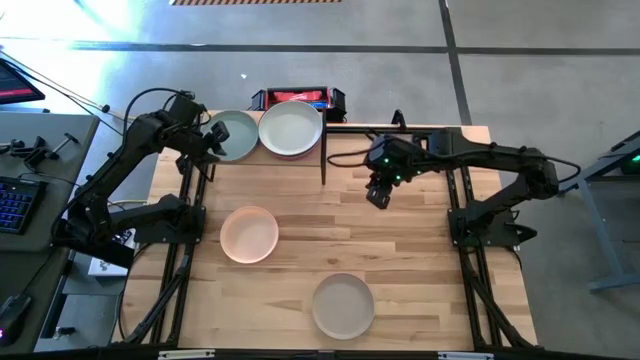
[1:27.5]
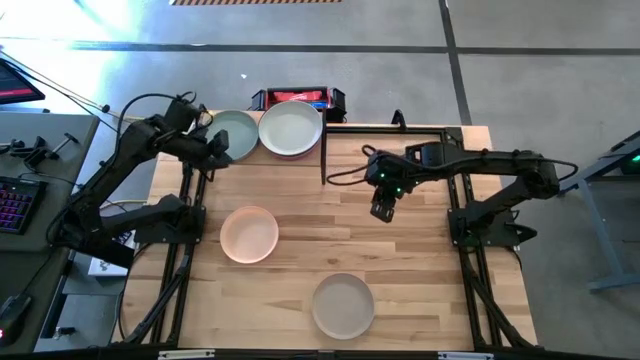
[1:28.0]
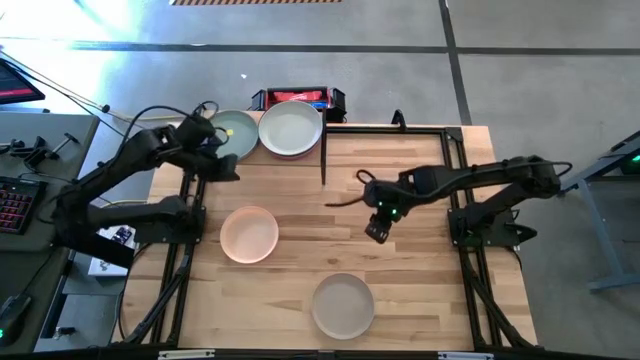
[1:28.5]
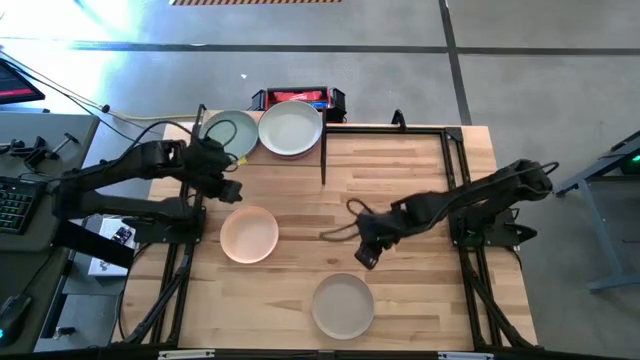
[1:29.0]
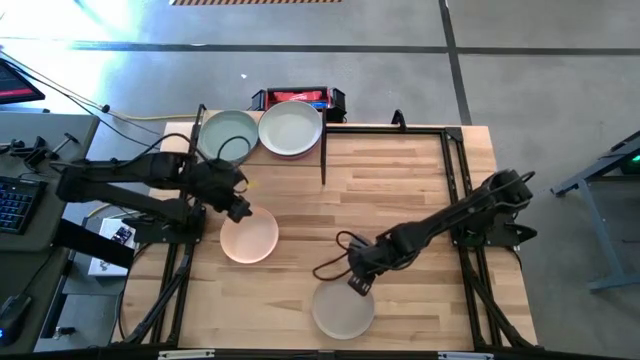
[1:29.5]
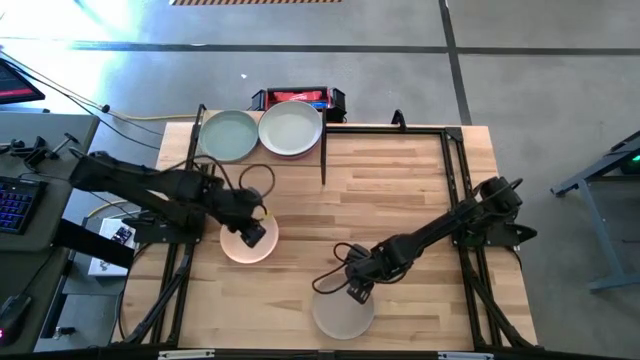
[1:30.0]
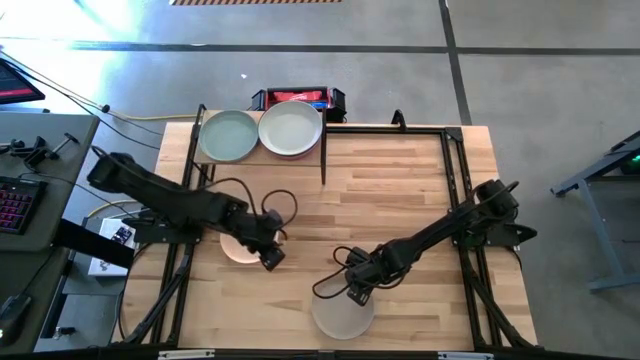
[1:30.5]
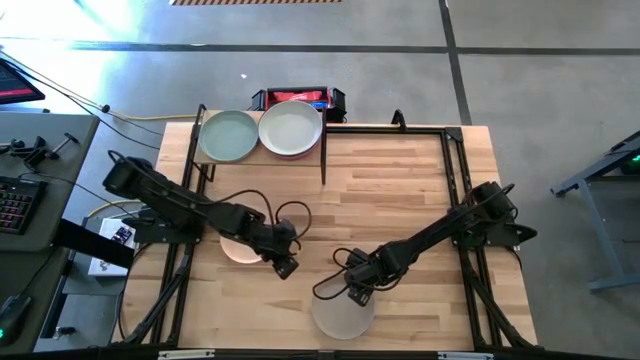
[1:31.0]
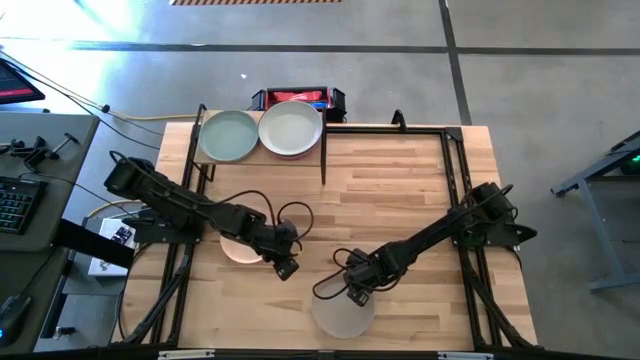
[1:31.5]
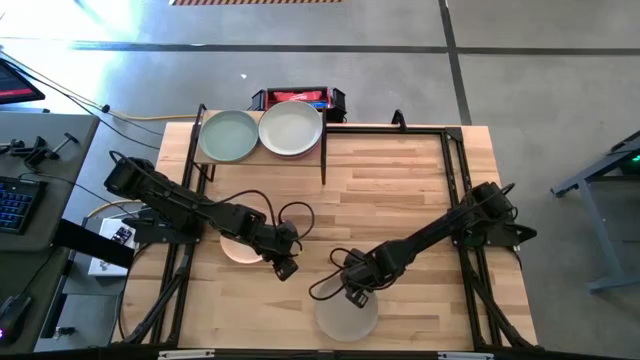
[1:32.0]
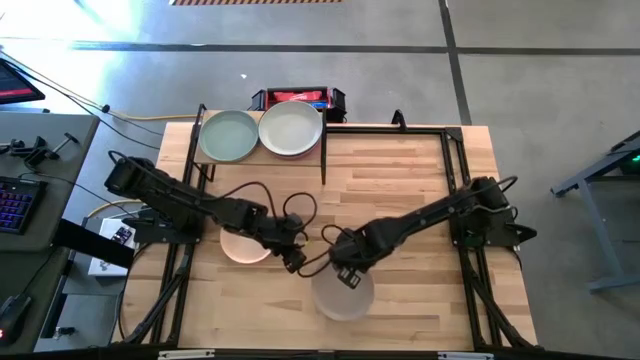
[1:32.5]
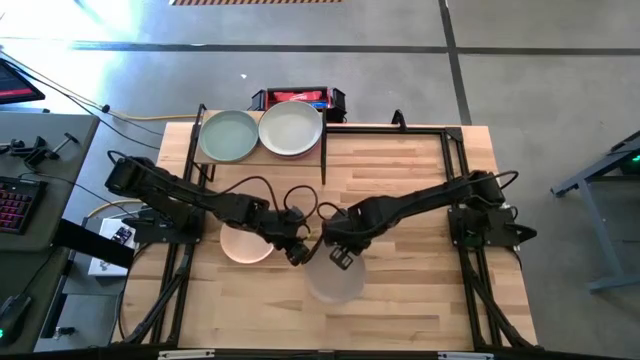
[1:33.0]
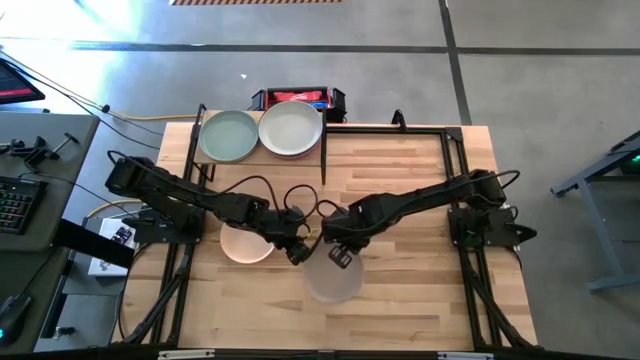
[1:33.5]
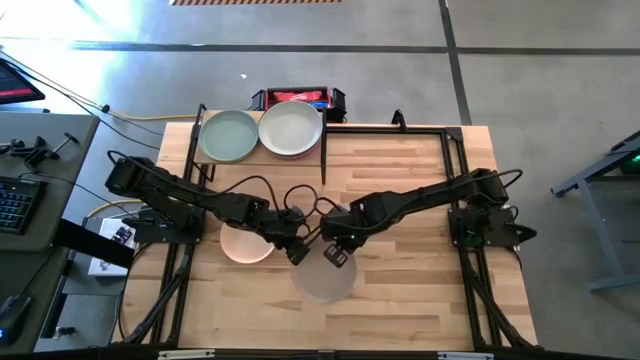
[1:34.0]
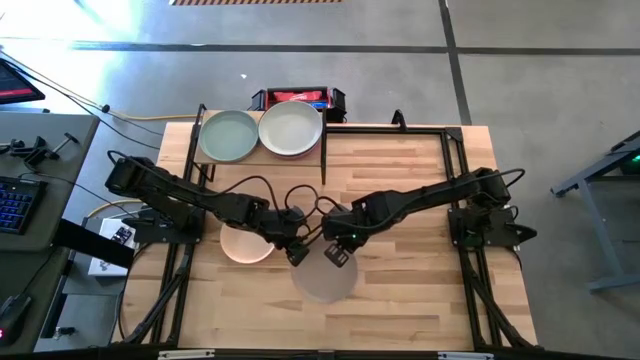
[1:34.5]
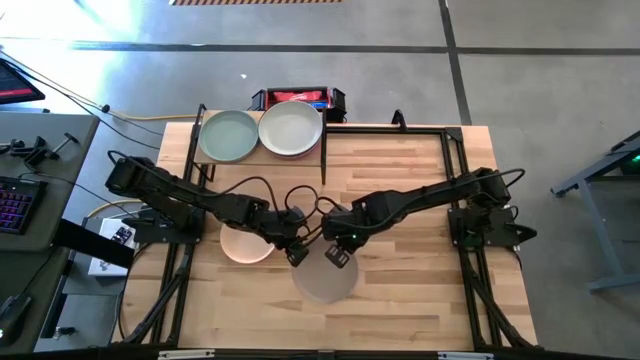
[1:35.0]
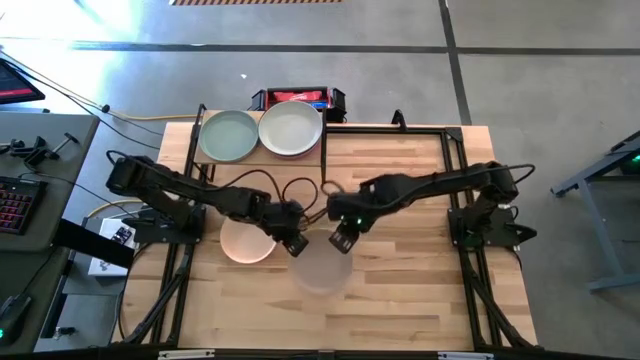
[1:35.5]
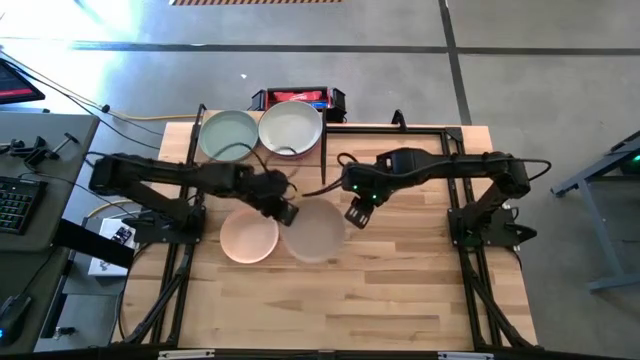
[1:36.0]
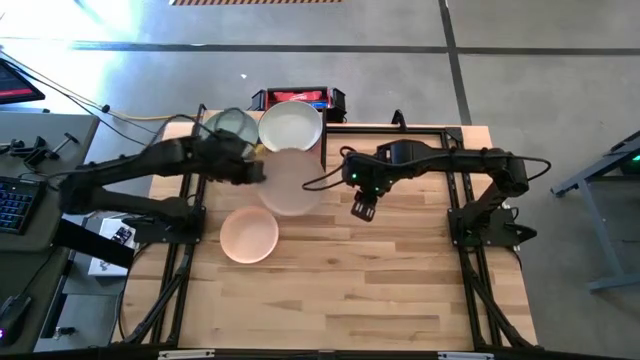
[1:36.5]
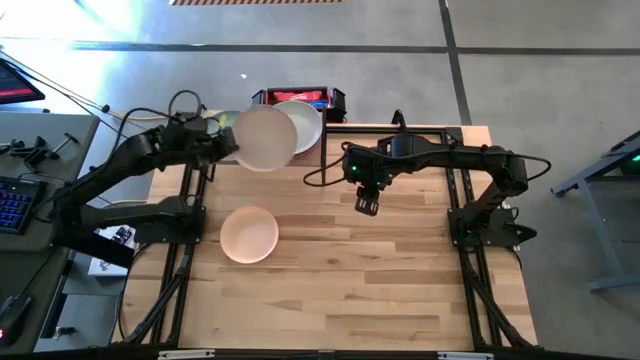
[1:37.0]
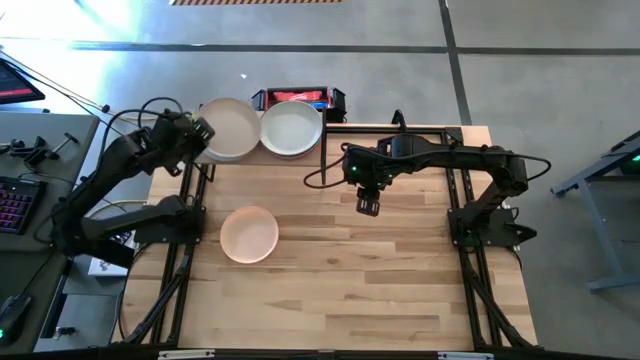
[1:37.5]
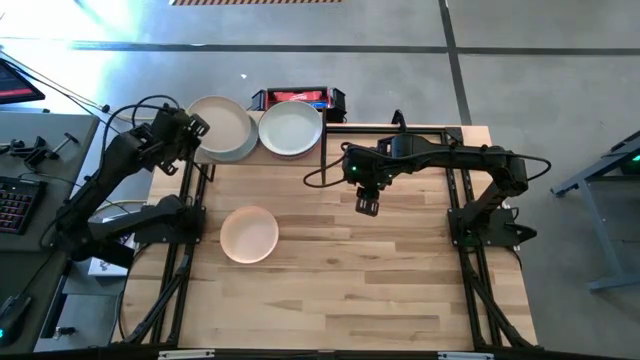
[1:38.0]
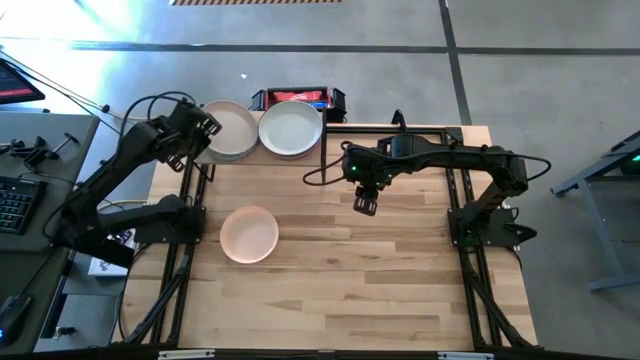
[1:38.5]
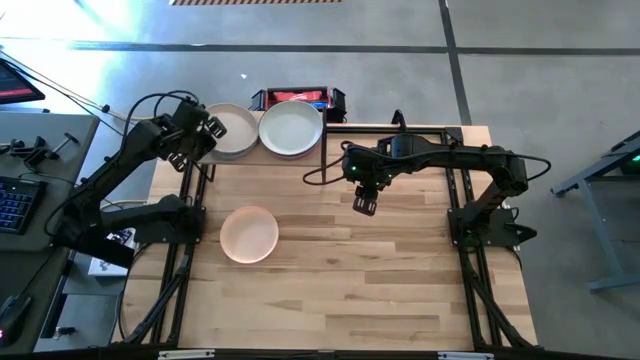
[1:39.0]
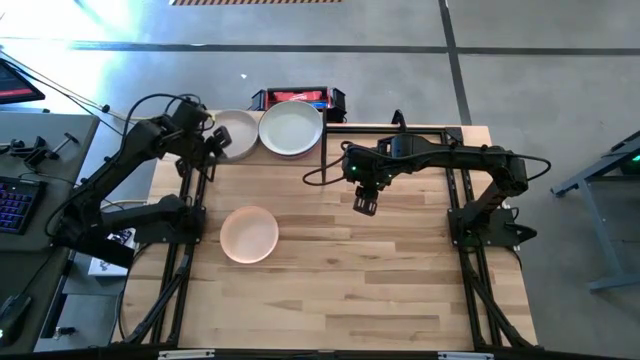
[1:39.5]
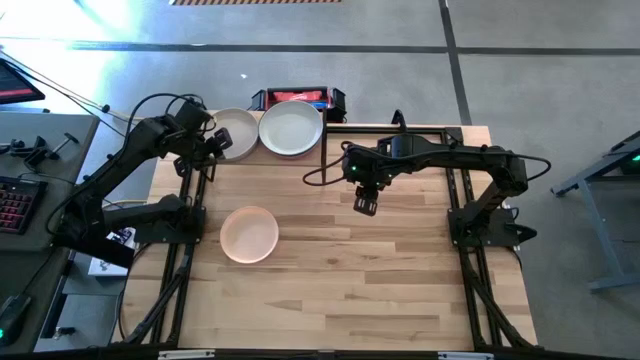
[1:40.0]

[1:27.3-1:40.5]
Task: Place and stack plates onto a shelf
Stack the light brown plate on top of the light blue plate on the shelf

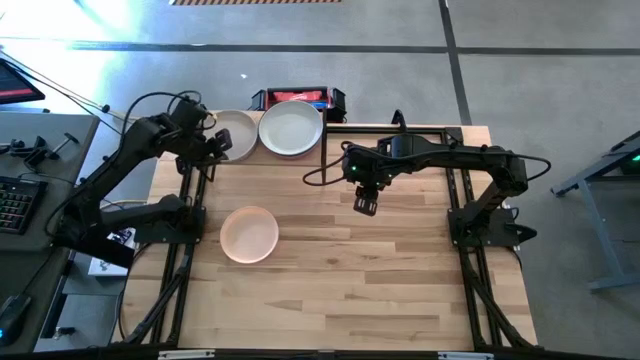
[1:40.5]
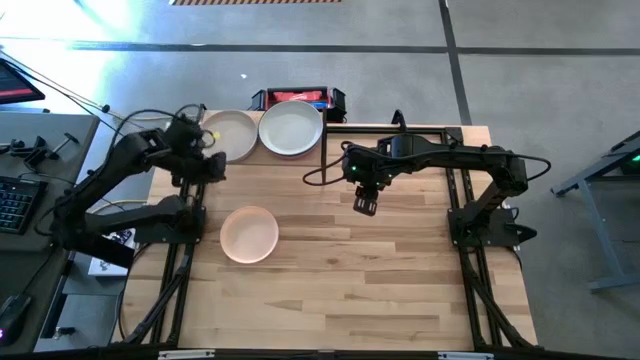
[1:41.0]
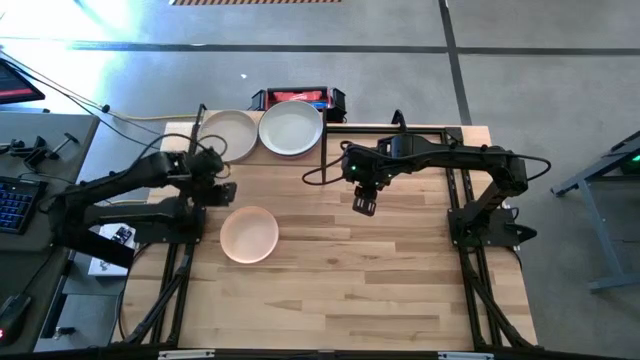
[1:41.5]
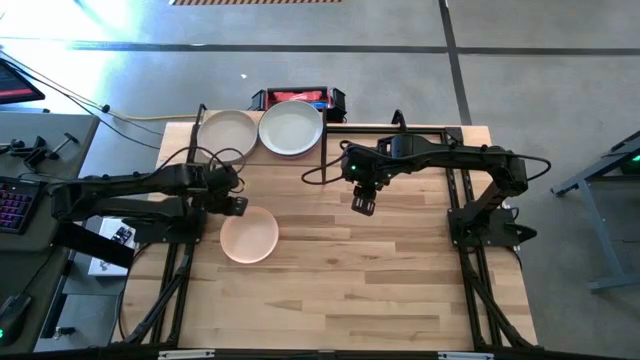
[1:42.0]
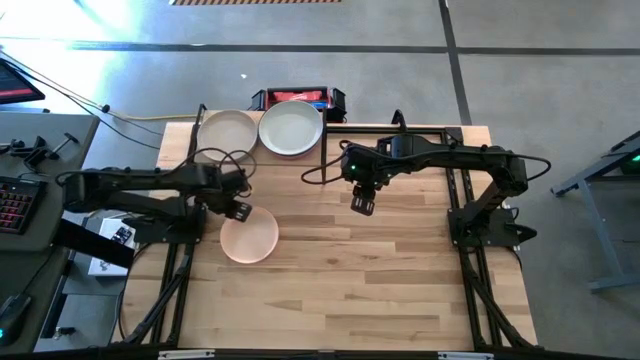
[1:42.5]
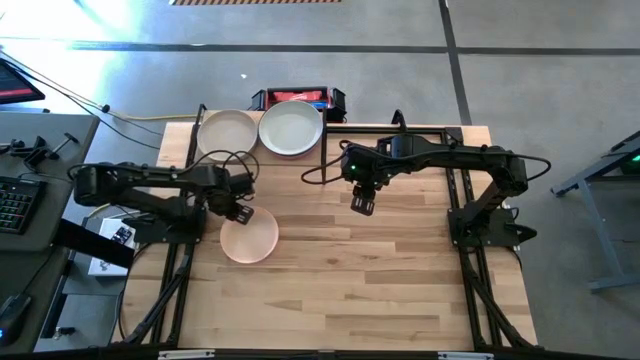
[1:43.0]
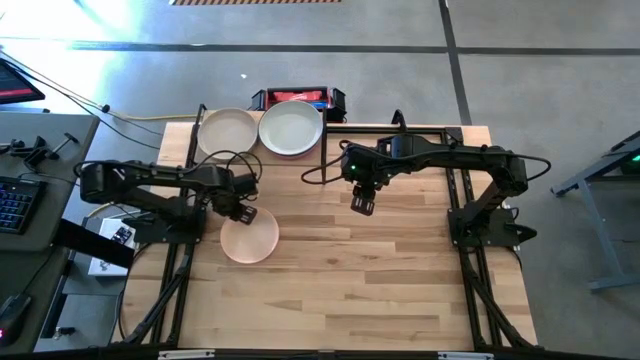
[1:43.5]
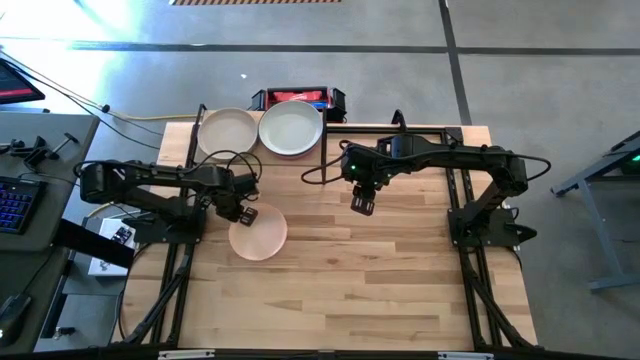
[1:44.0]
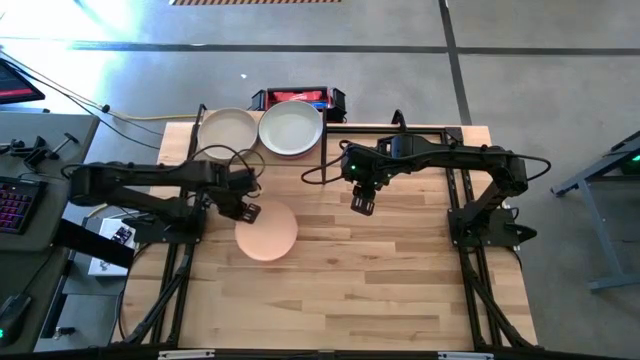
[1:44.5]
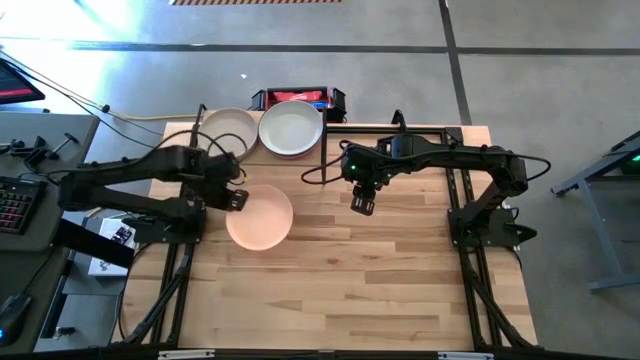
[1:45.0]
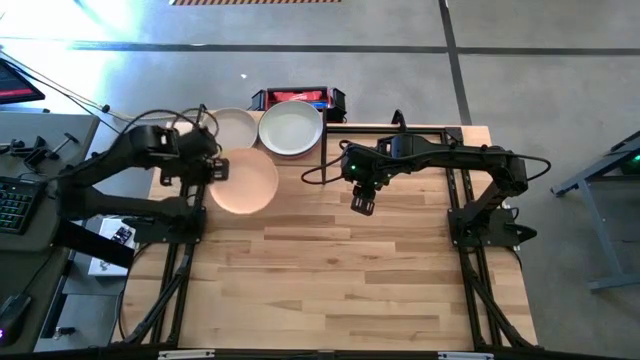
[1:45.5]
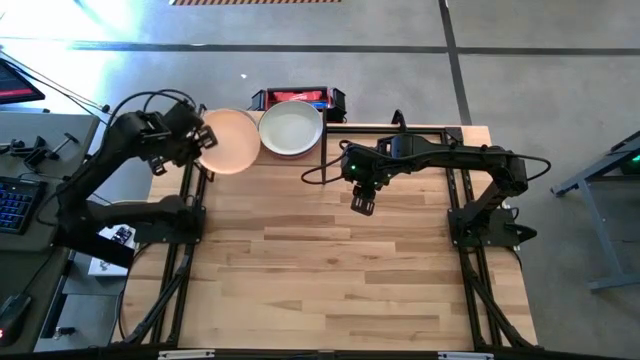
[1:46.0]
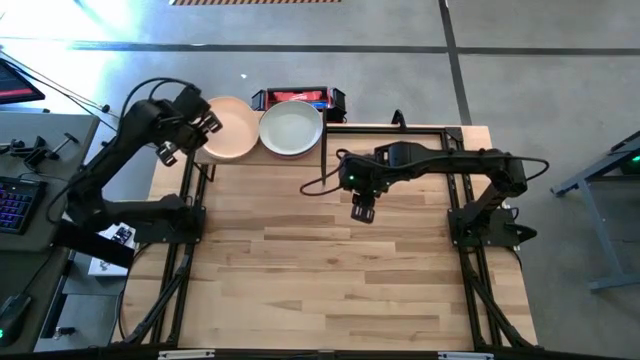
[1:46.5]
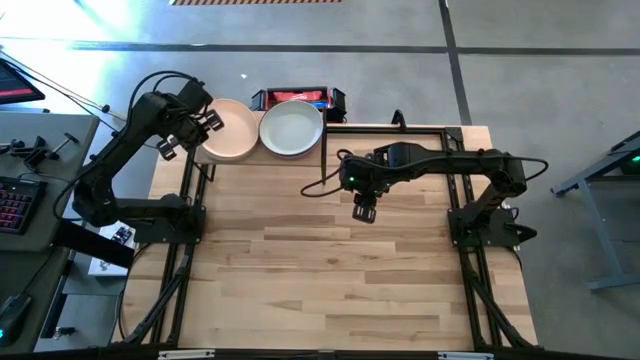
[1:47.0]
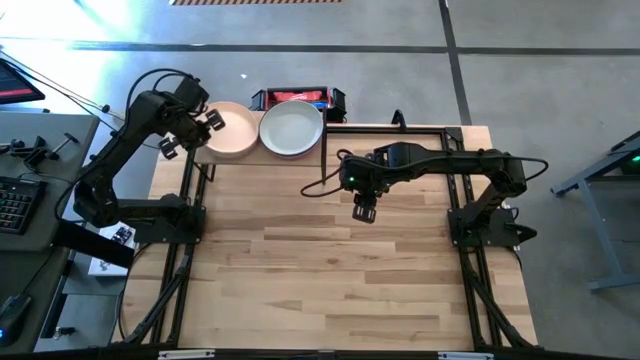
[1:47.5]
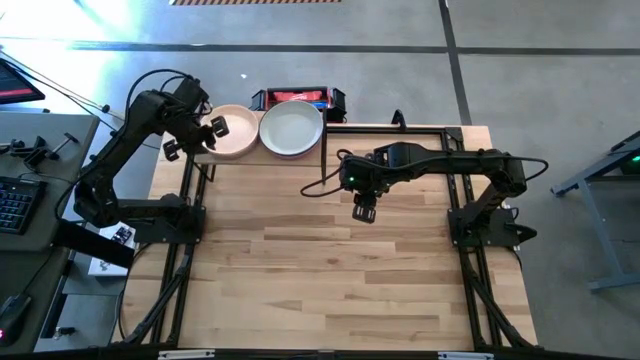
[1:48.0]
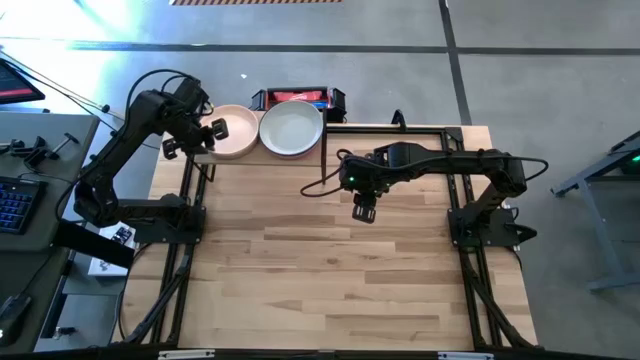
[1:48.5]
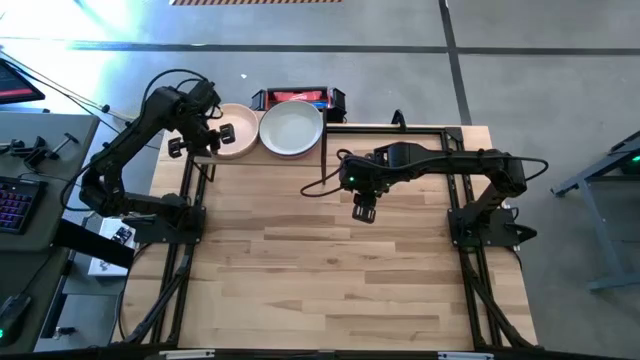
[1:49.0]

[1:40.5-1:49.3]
Stack the light orange plate on top of the light brown plate on the shelf

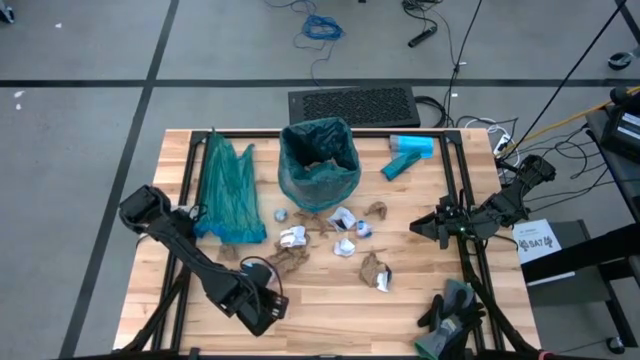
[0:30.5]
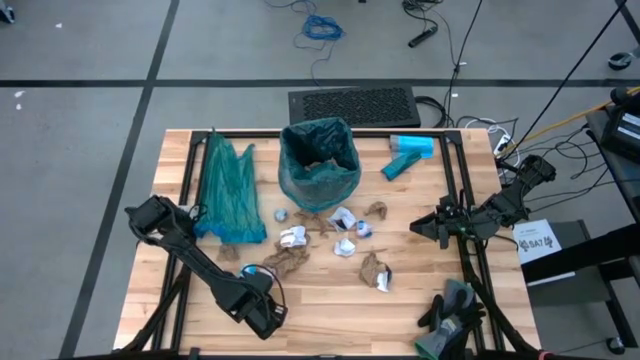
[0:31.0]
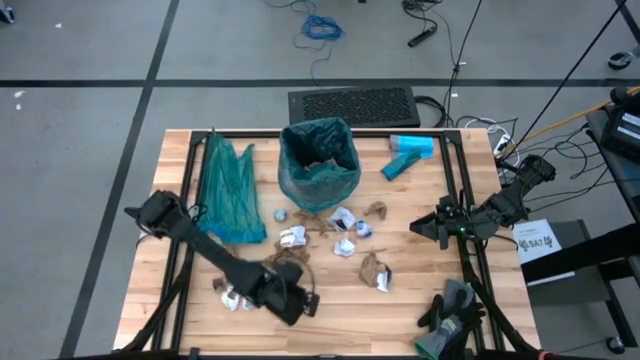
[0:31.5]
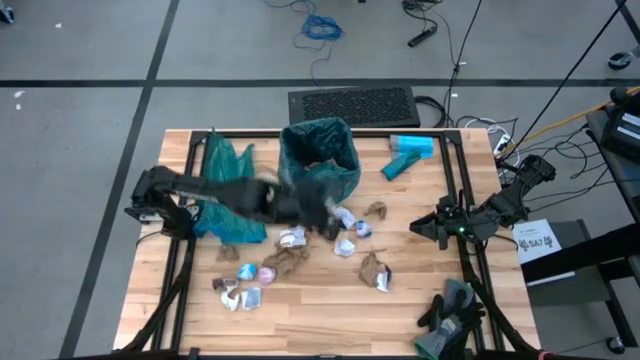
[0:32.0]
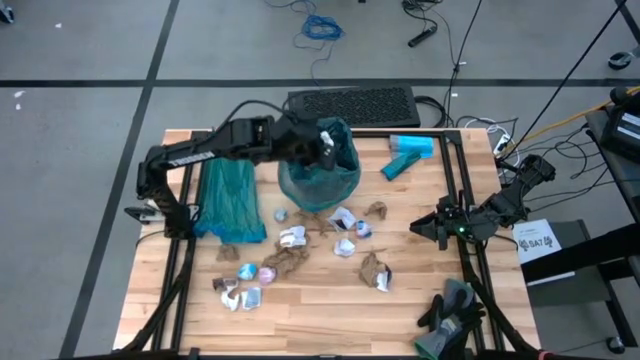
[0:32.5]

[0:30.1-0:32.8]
Task: place trash/remove bag and relplace
Put the white napkin into the blue trash bag inside the black trash bin
